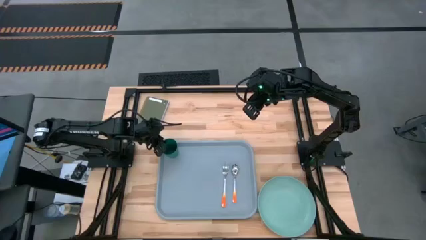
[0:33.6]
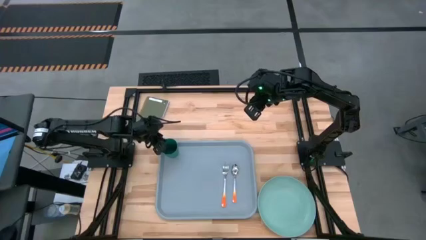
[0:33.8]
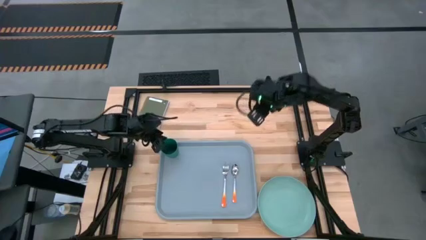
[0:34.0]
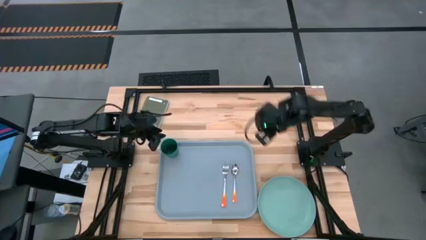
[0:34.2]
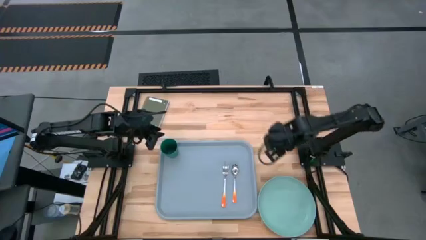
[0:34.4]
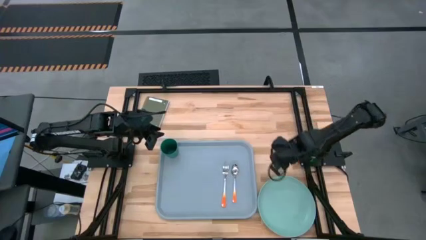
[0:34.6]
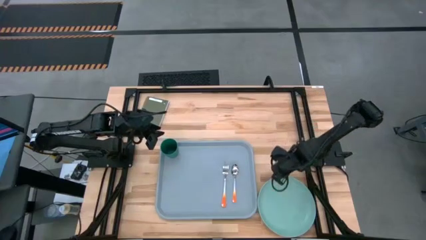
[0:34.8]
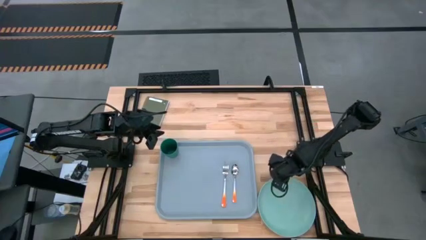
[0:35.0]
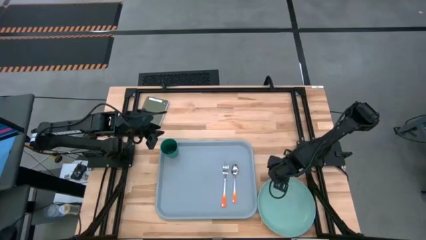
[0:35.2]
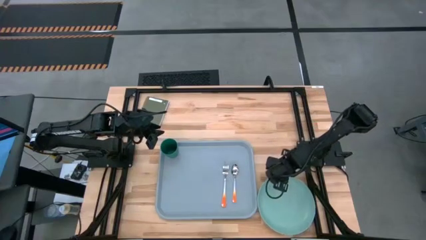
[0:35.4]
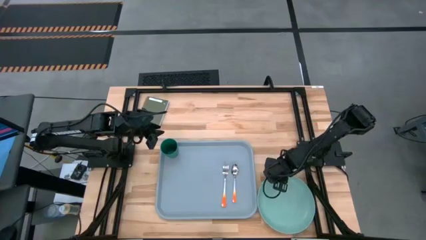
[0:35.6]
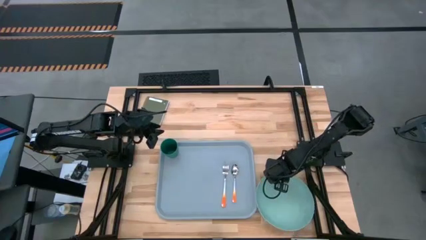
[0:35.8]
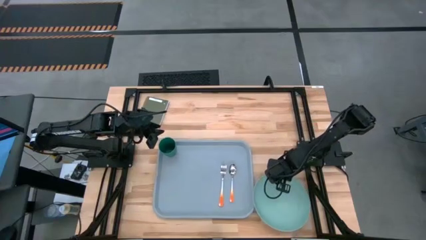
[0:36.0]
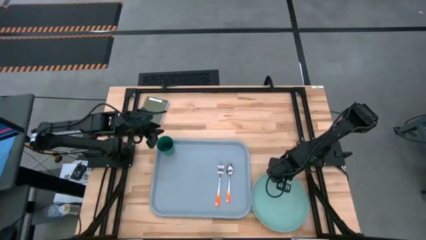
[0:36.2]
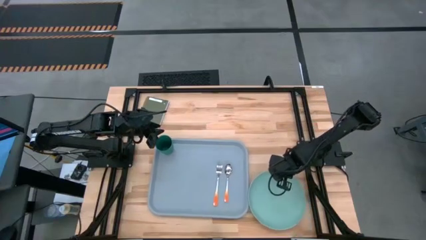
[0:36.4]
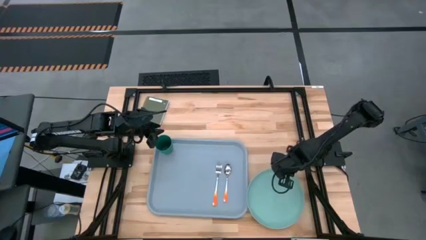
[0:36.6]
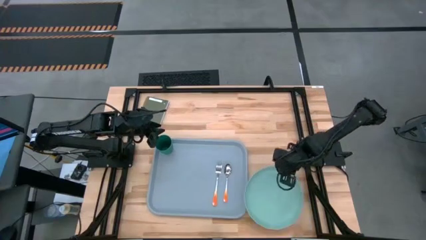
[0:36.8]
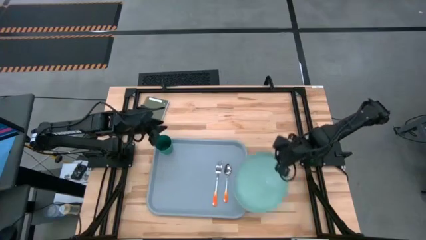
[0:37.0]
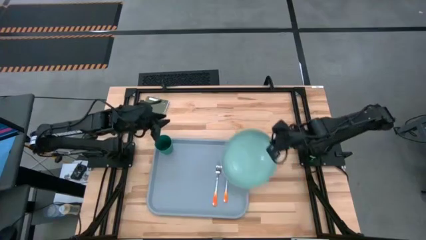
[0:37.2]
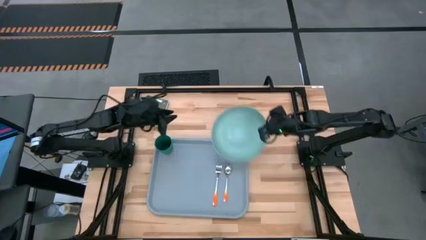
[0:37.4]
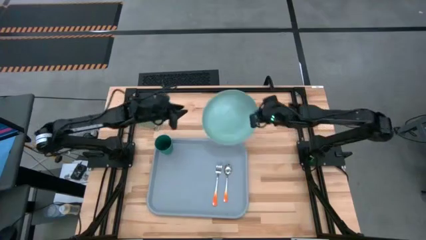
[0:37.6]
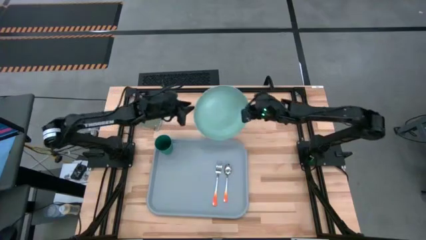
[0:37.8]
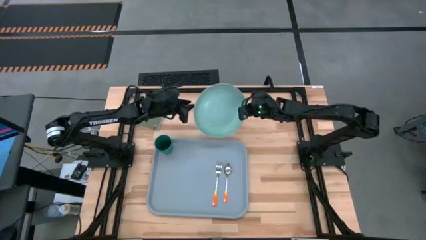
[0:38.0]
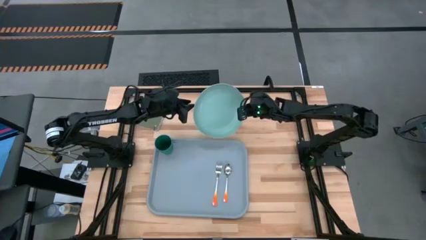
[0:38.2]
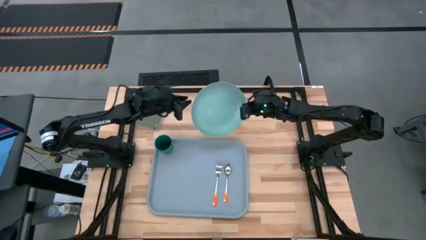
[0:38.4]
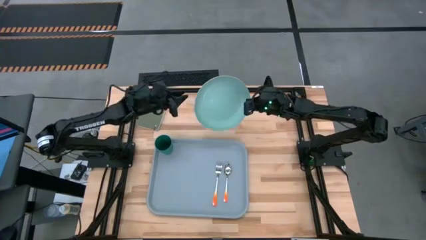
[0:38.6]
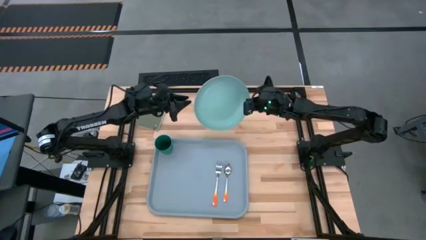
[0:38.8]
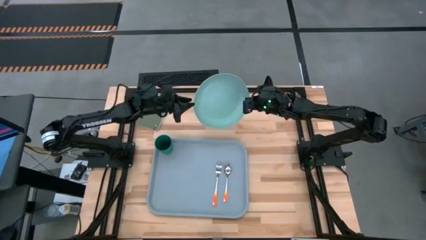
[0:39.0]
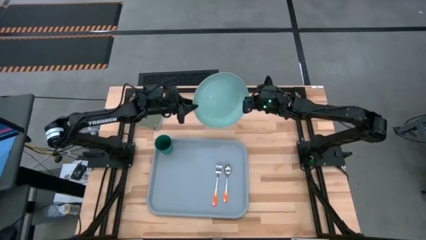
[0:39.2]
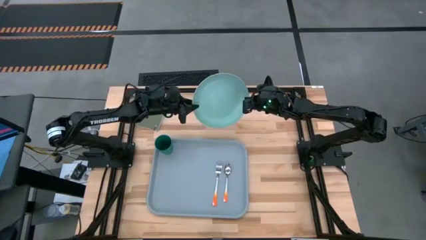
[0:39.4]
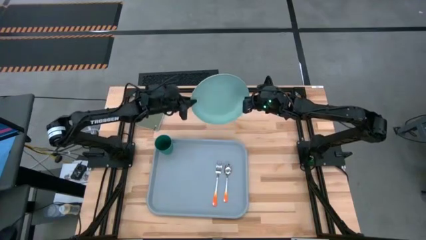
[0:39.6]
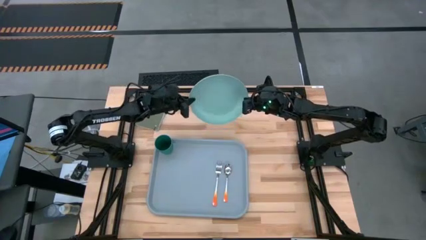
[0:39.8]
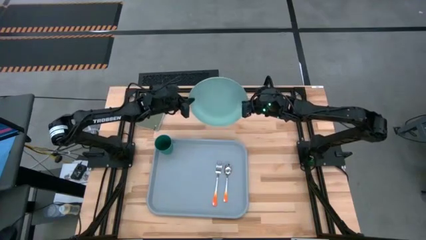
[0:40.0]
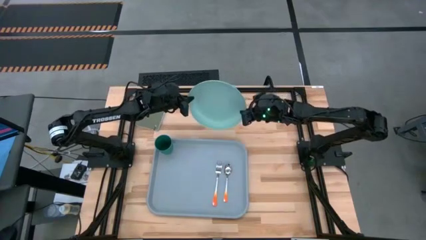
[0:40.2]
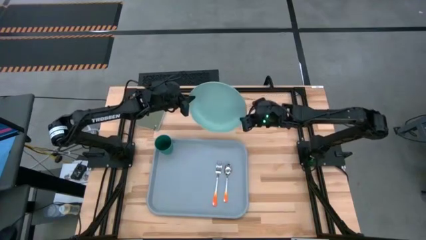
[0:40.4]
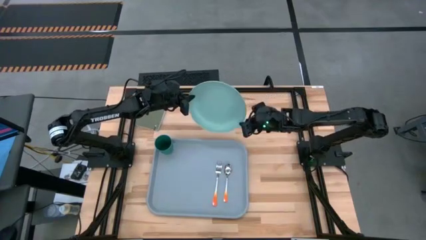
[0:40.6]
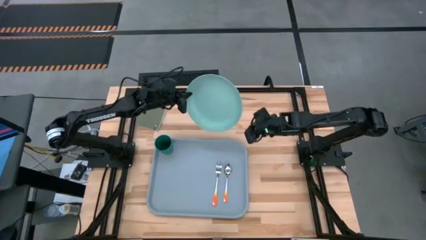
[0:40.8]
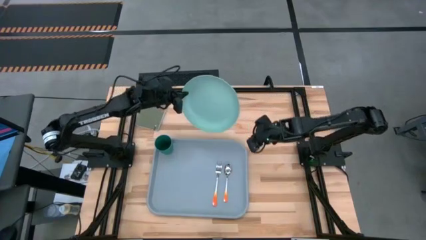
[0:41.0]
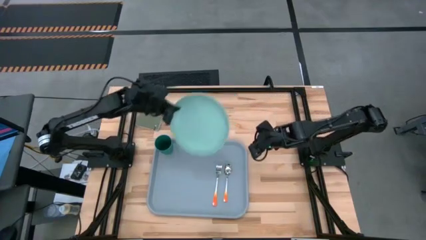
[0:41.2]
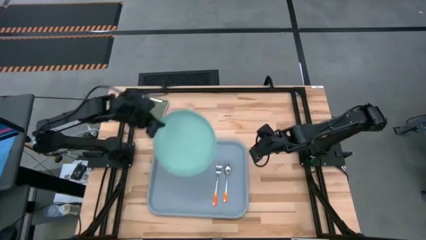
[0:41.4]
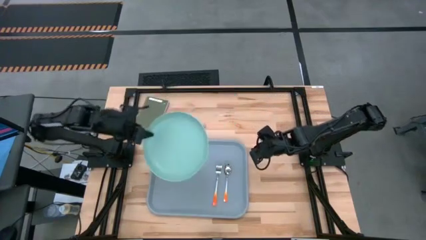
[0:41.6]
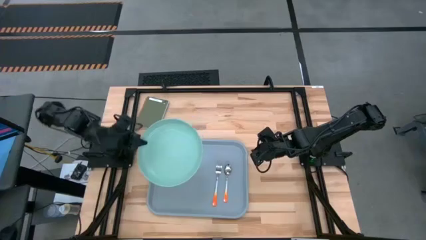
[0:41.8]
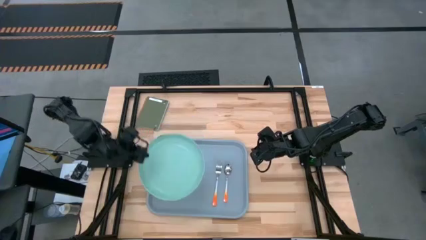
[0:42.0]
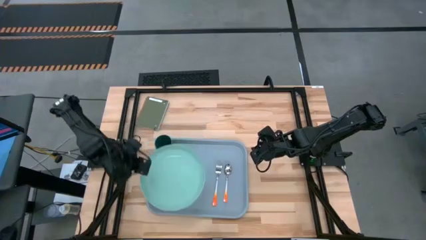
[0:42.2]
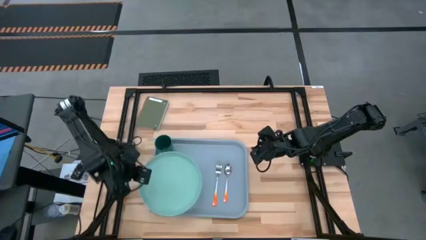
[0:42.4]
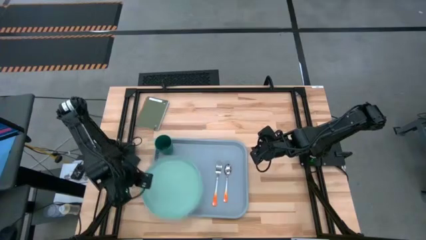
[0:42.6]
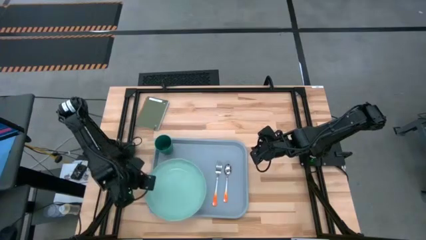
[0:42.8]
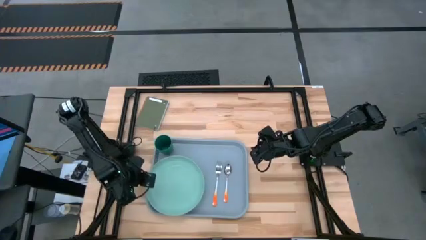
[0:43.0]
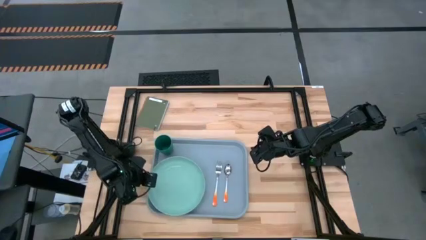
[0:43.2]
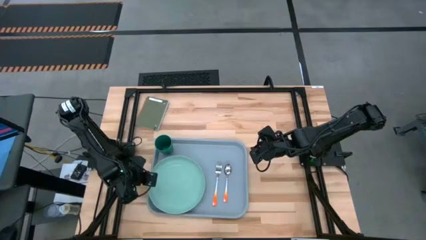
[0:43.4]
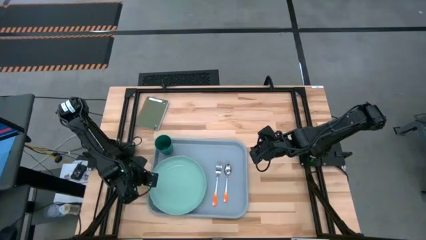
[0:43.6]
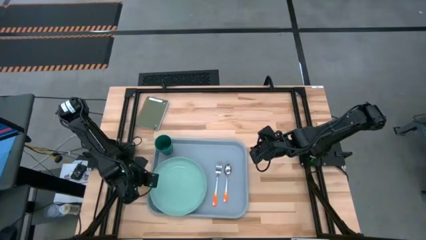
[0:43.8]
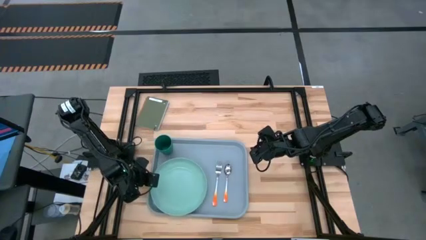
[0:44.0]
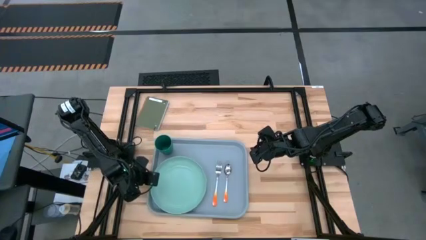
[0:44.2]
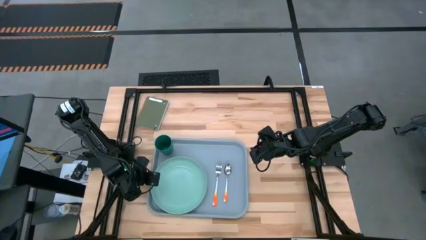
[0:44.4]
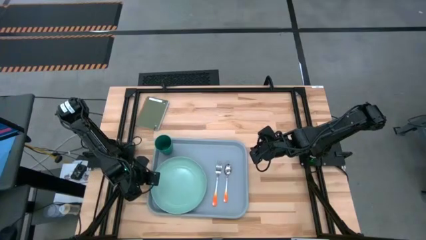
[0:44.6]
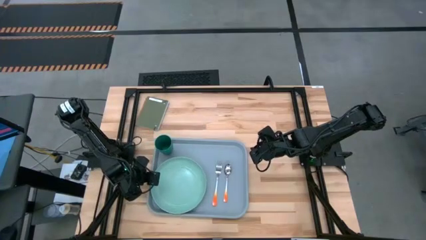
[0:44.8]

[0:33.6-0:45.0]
Task: Pick and place plate/cup/fork/spoon on tray
Put the light blue plate to the left of the orange fork on the light gray tray

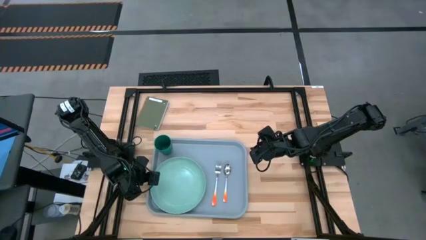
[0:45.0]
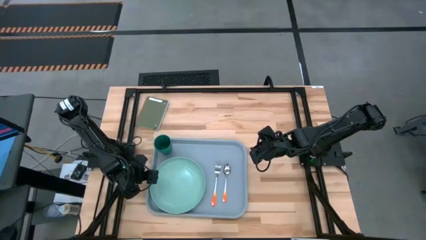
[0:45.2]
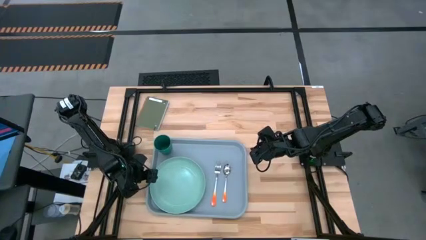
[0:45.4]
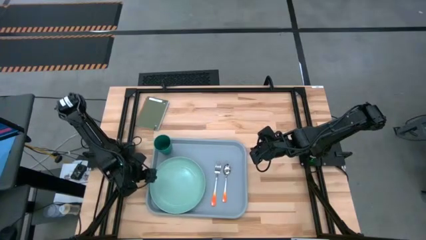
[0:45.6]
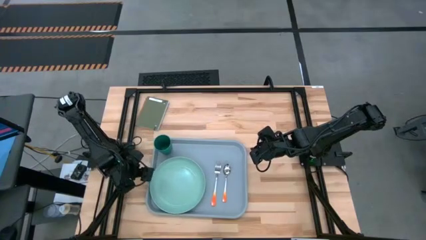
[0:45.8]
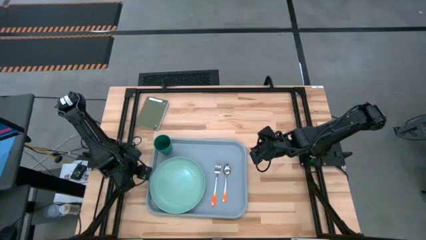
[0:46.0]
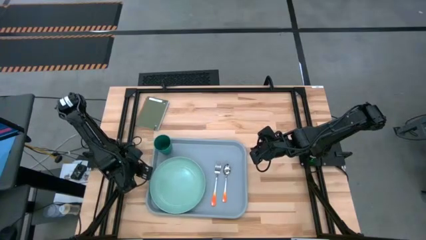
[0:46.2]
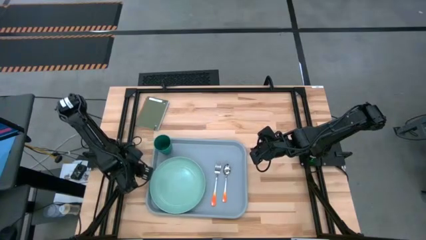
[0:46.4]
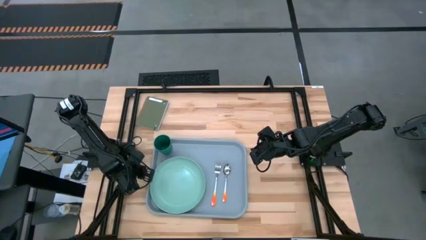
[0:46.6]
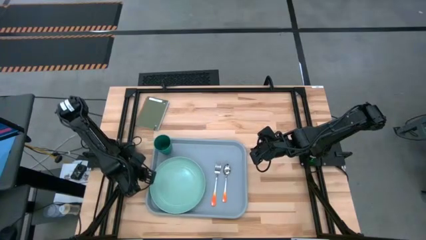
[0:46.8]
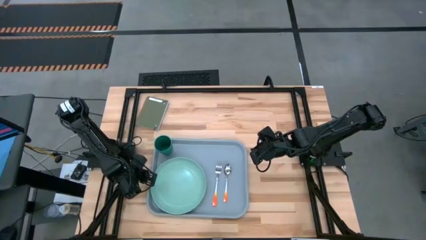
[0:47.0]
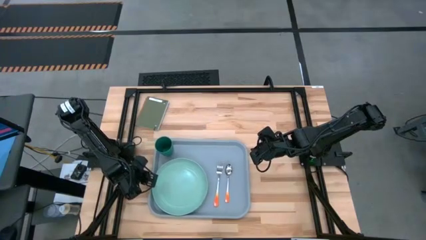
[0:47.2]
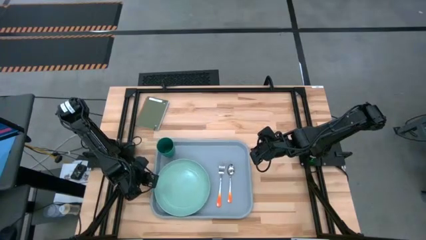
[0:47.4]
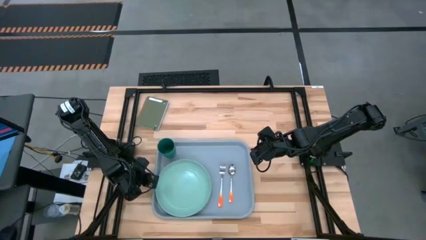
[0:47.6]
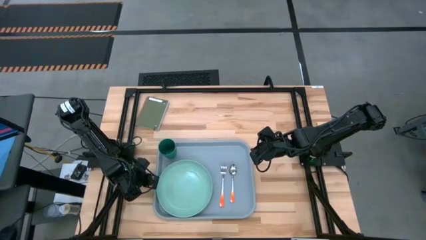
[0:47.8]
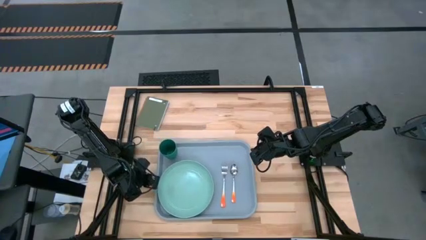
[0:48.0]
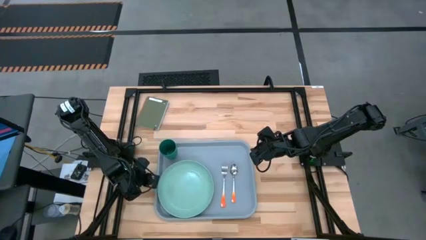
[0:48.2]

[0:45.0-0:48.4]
Adjust the light gray tray
